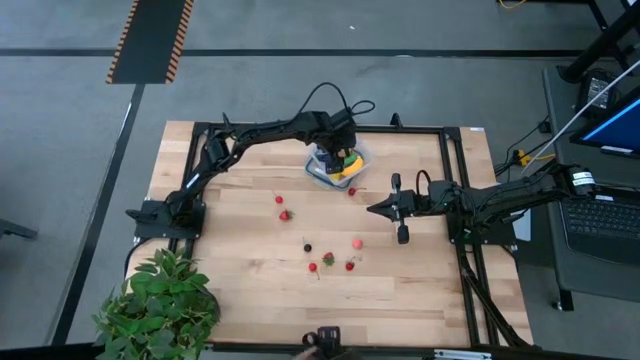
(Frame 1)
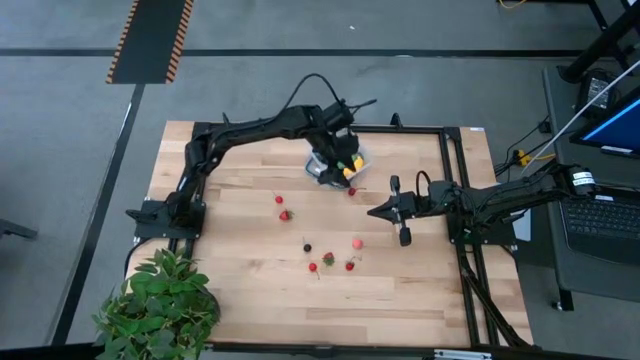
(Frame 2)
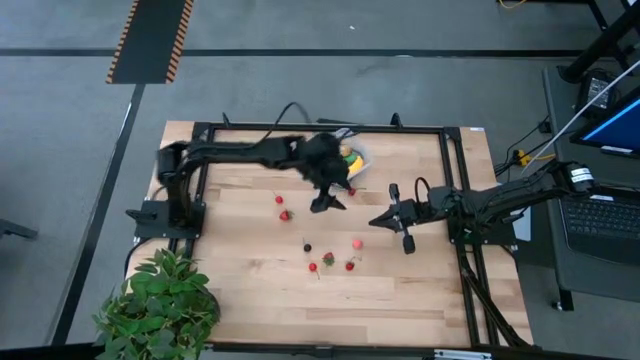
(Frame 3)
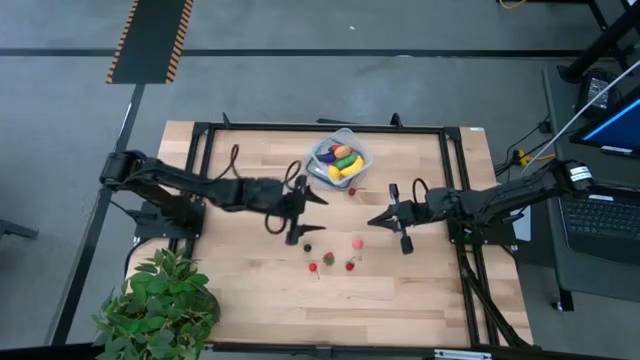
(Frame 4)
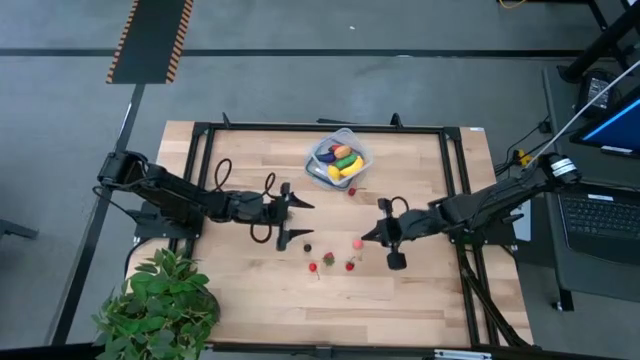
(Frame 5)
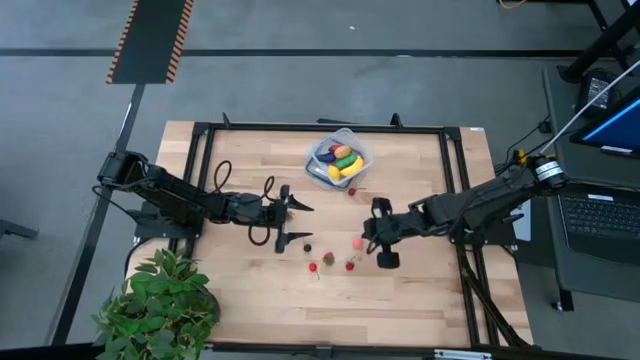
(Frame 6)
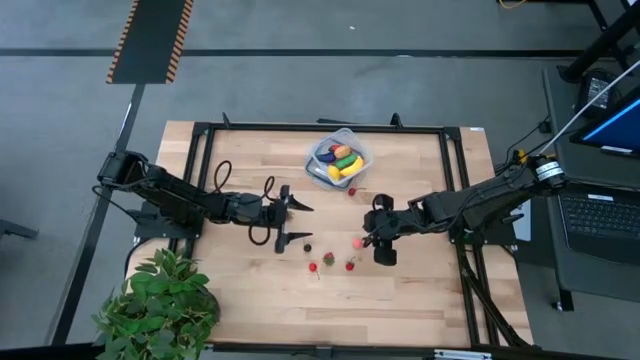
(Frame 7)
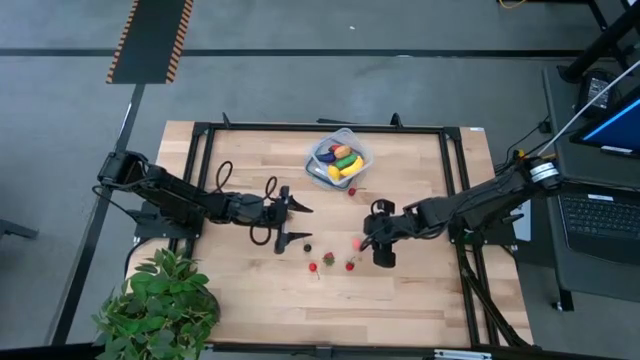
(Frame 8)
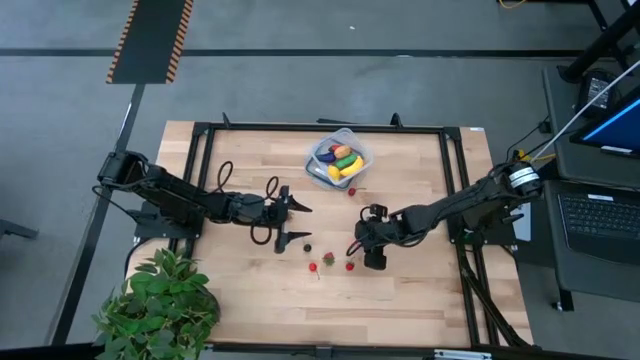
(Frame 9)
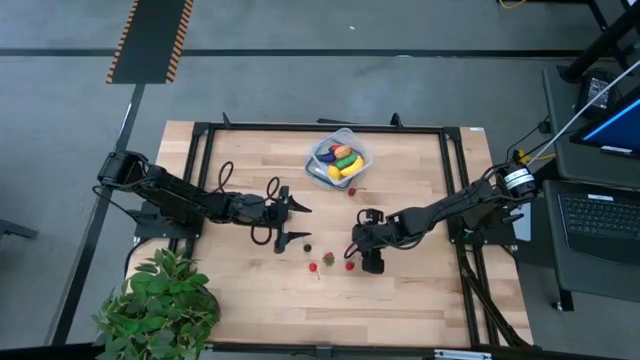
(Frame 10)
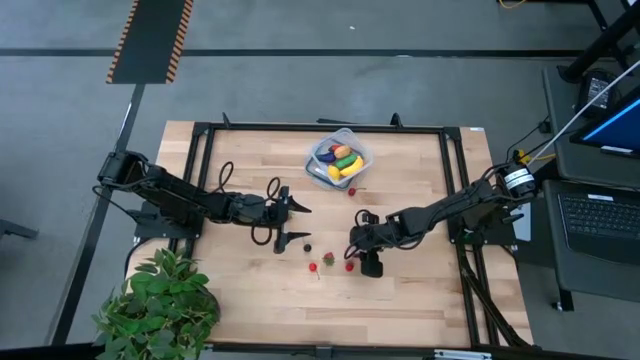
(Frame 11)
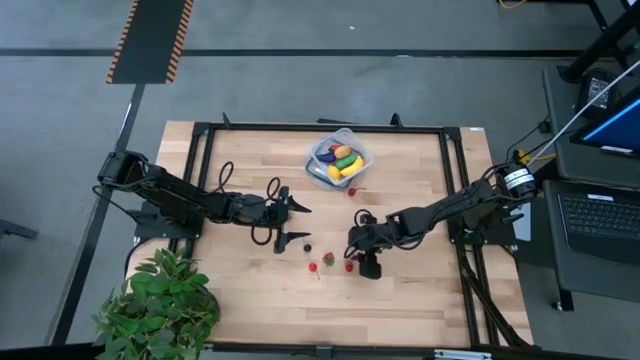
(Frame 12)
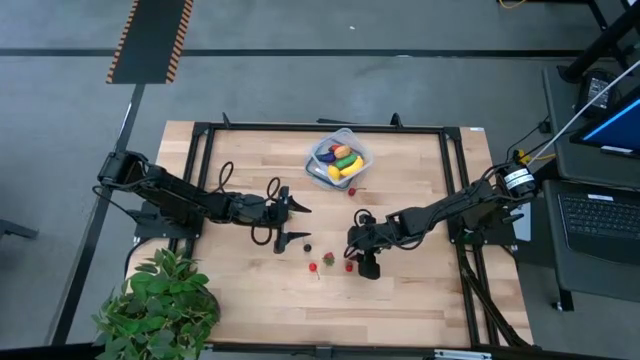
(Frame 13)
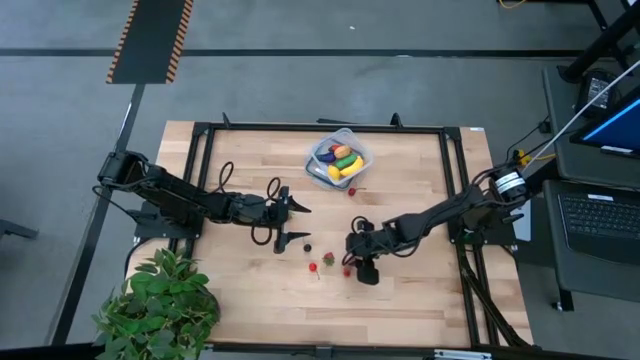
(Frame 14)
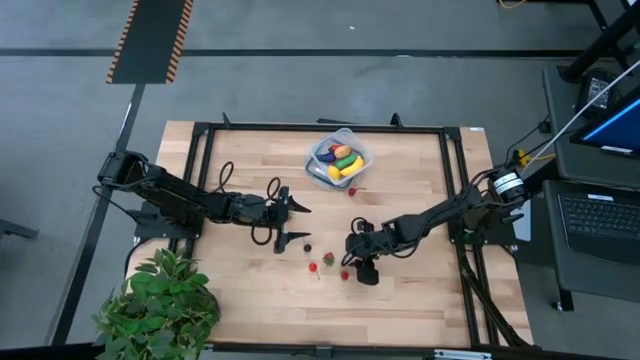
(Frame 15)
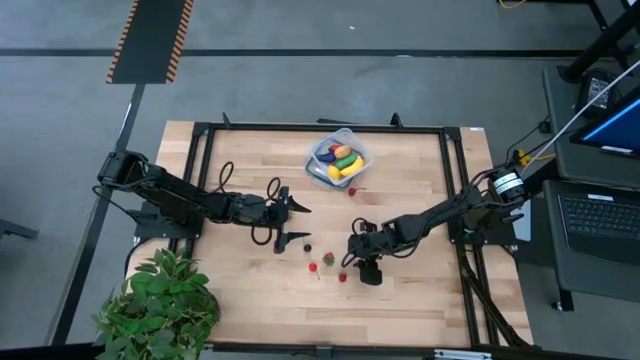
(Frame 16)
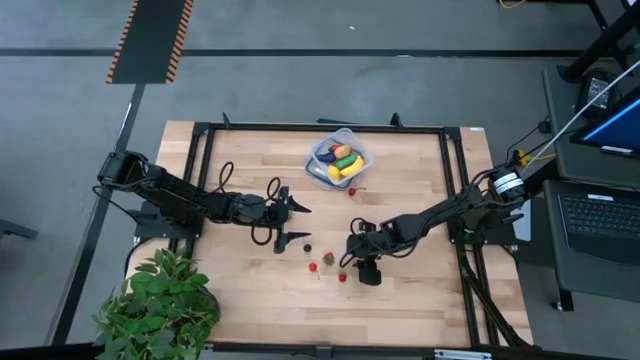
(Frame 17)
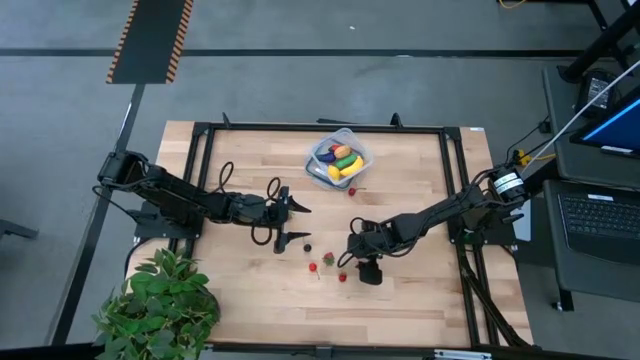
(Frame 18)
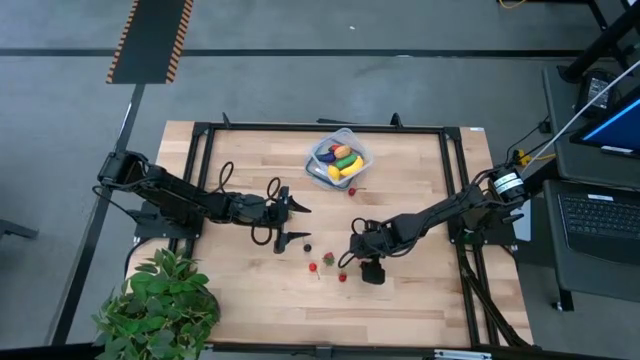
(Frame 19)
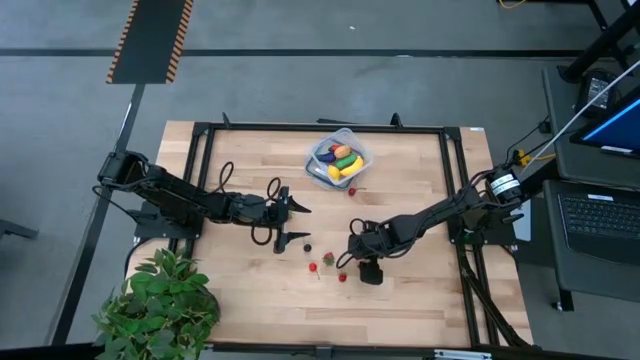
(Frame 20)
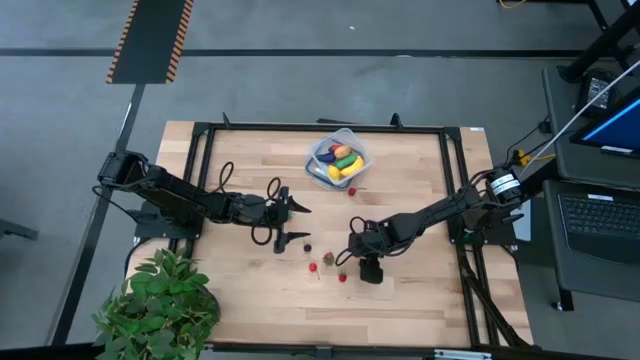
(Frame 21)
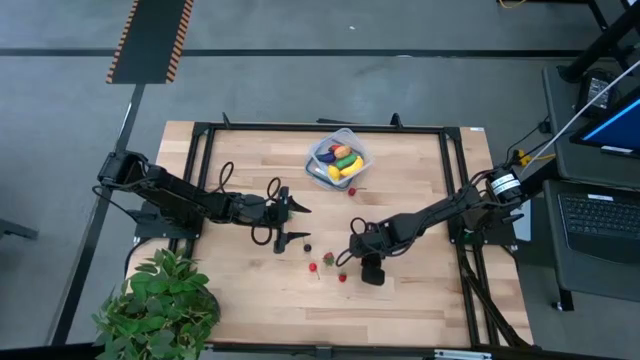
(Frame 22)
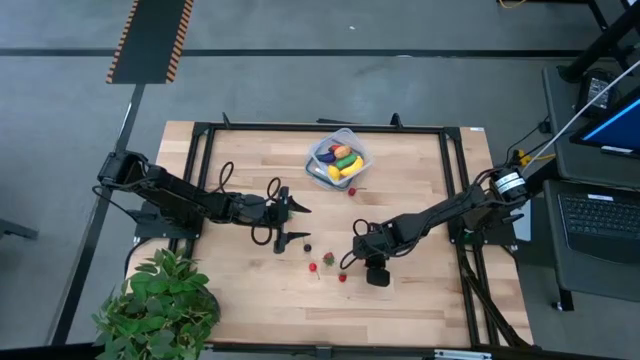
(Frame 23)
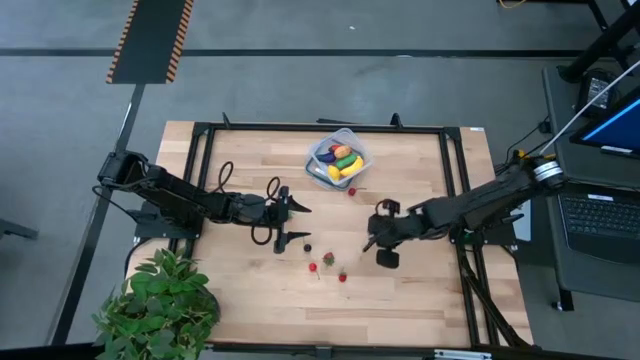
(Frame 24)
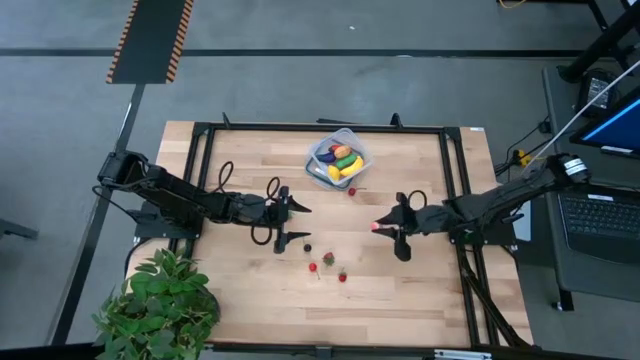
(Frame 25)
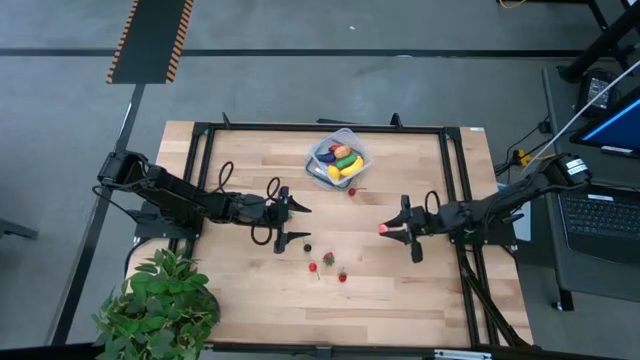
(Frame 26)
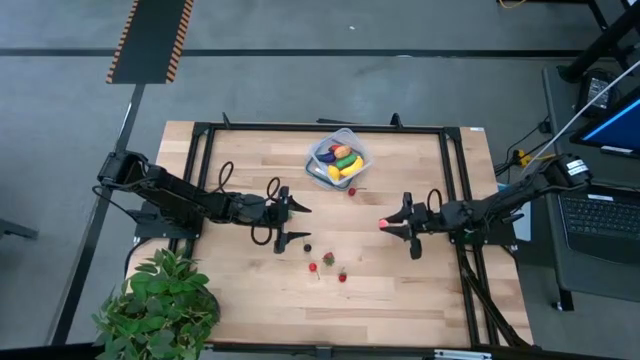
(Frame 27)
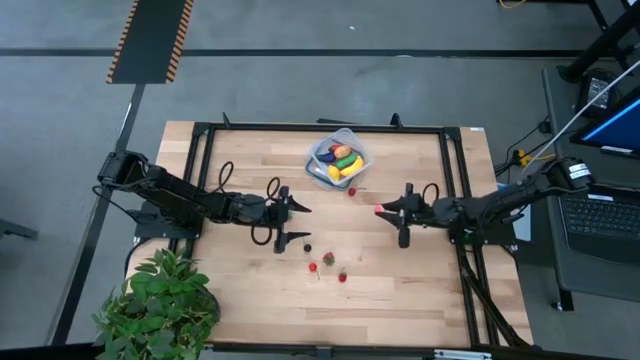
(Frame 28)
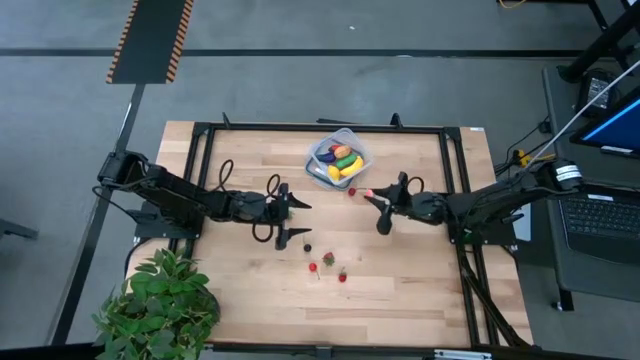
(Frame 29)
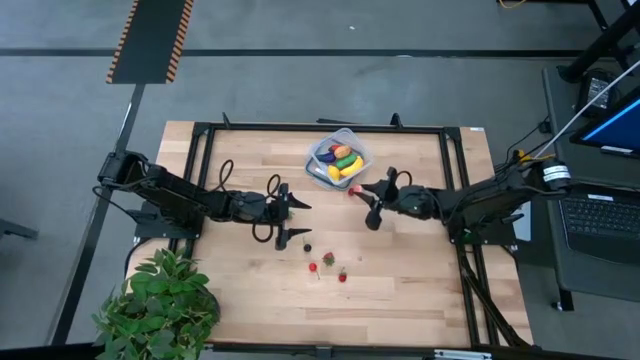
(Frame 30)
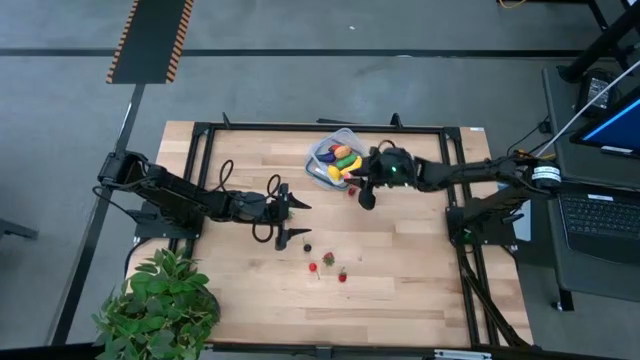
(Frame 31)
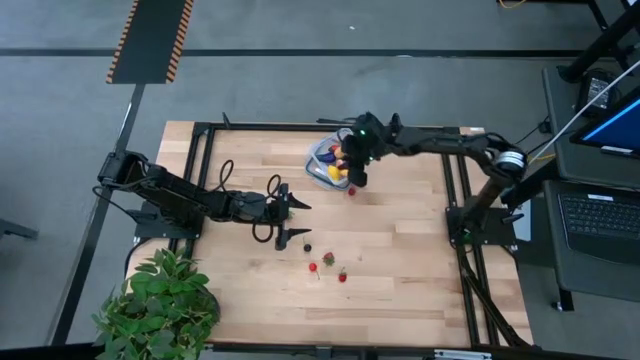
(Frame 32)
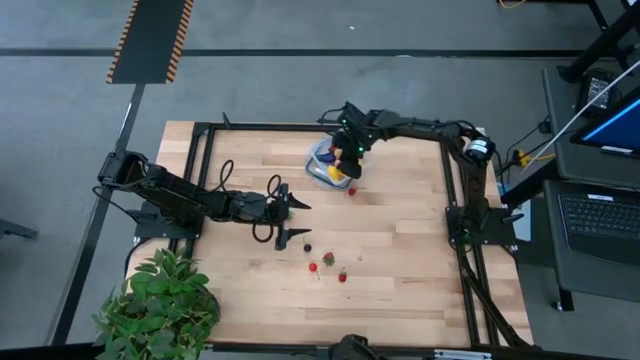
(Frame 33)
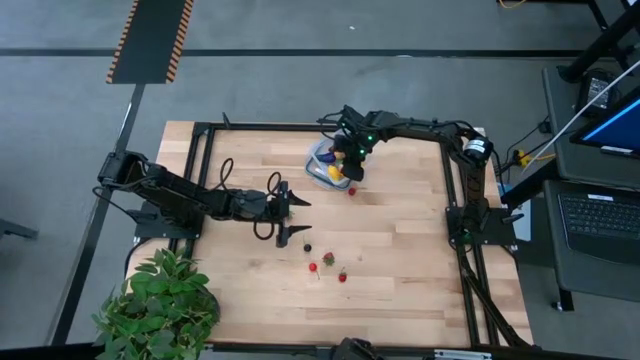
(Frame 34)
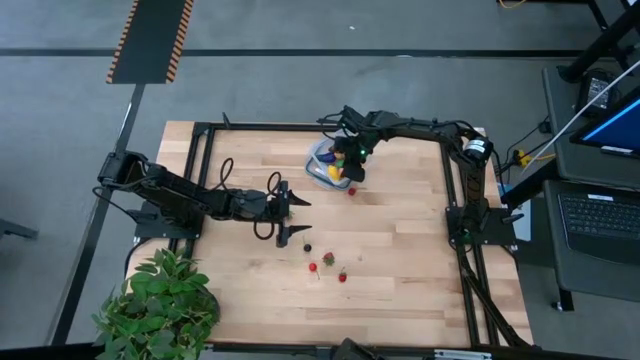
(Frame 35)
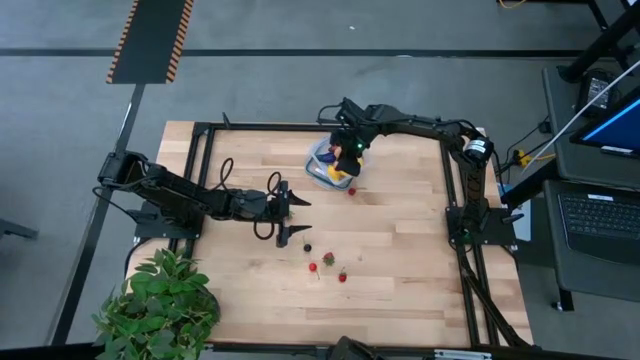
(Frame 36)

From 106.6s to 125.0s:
Task: Pick and placing Produce into tupperware
Put the pink peach into the transparent container

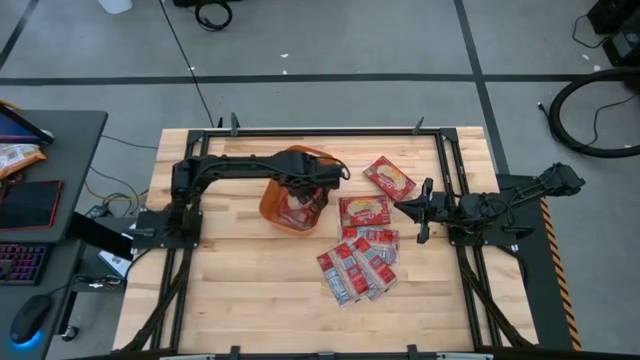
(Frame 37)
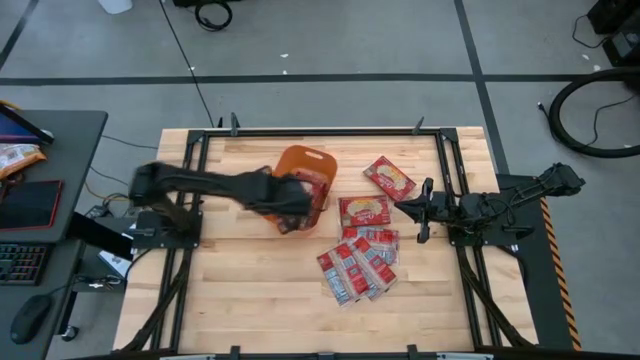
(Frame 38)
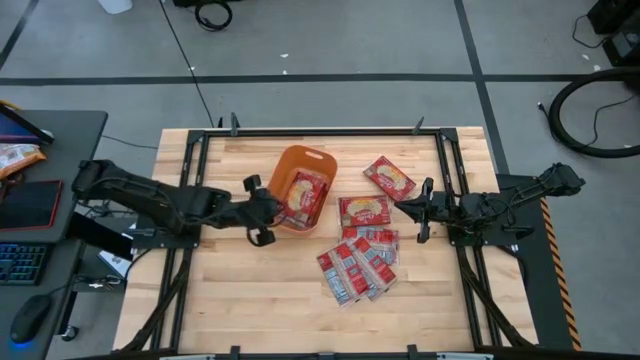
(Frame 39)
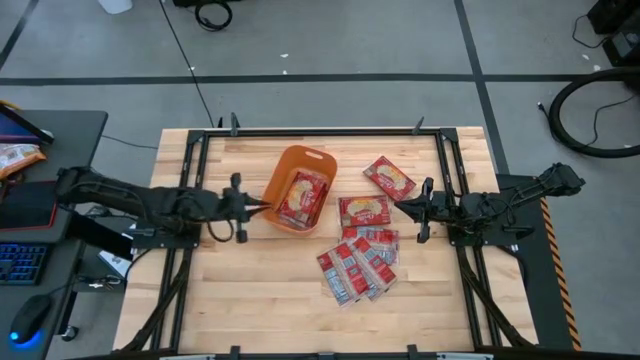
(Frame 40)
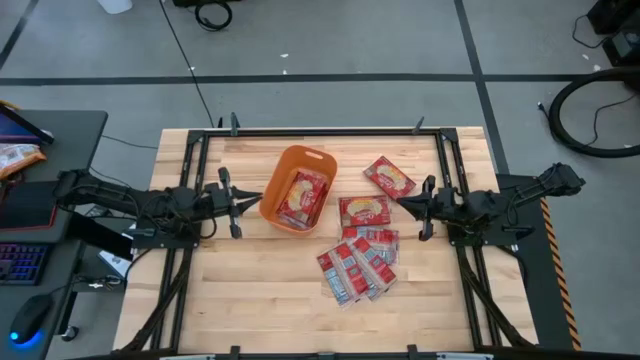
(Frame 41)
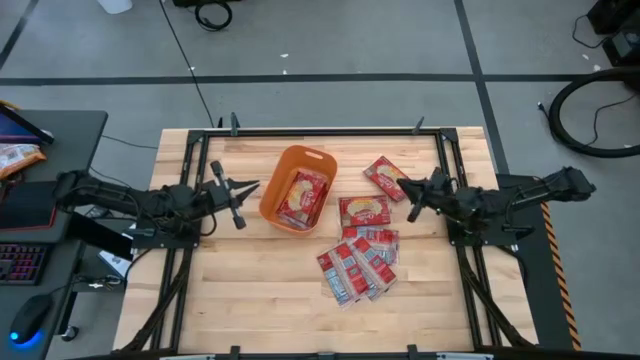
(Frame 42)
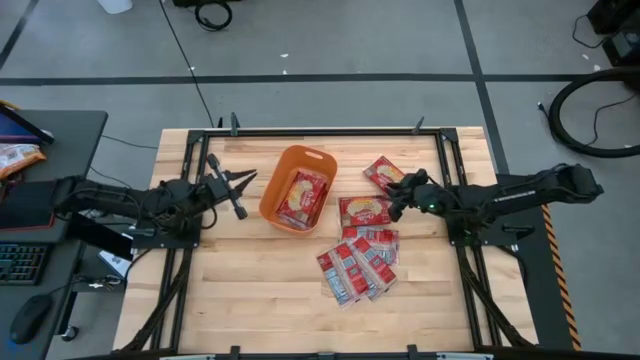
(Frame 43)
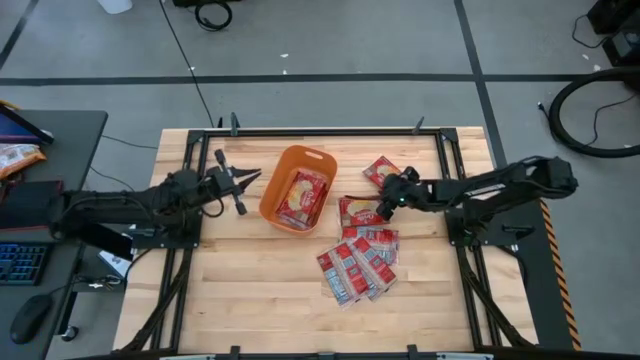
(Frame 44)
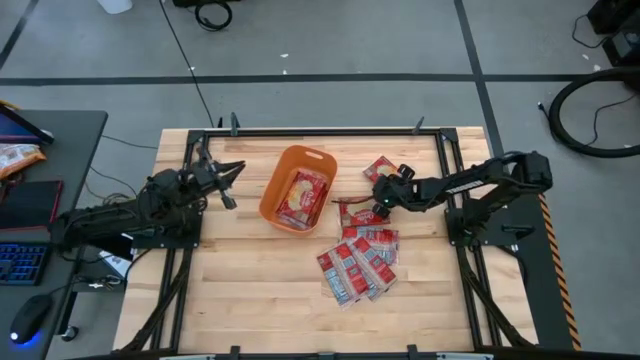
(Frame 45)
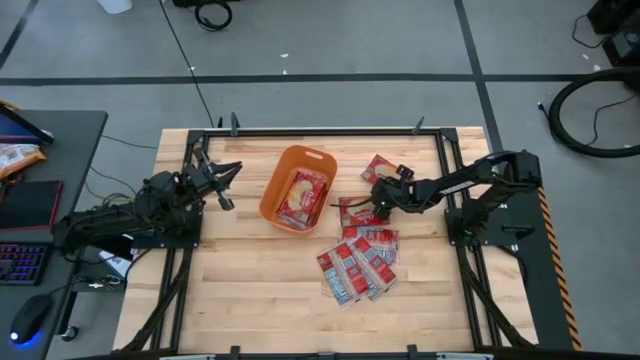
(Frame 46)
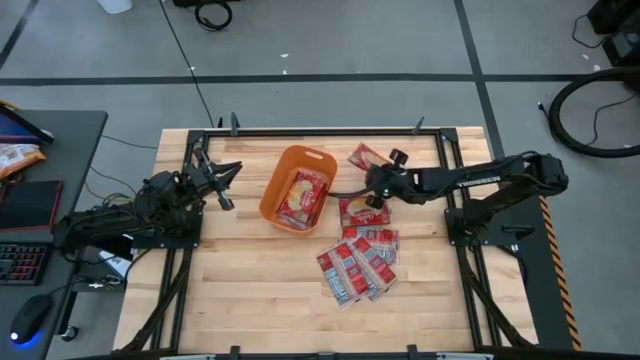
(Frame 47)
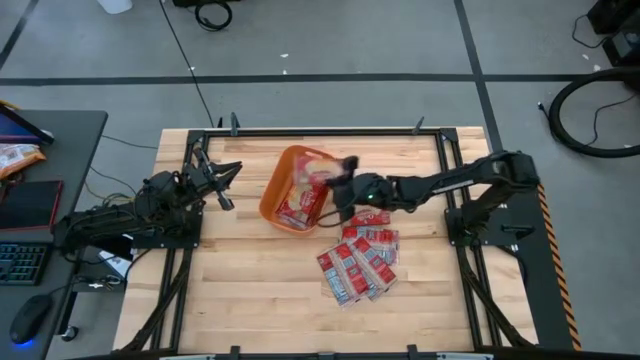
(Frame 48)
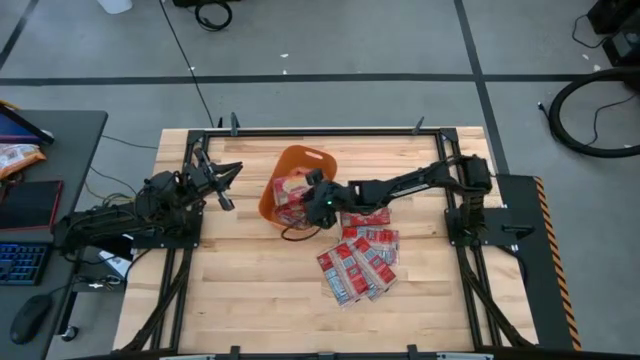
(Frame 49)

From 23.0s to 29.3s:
Task: Sort popcorn bags into baskets
Put the red popcorn pack into the orange bin
